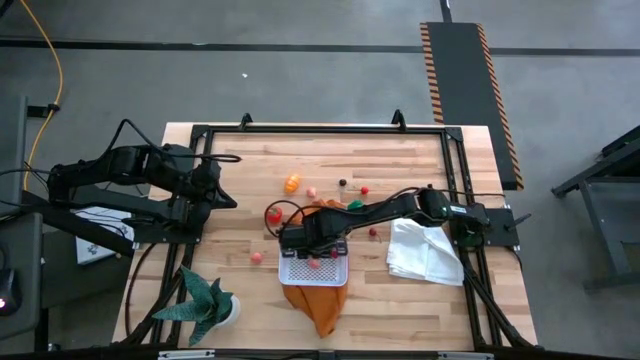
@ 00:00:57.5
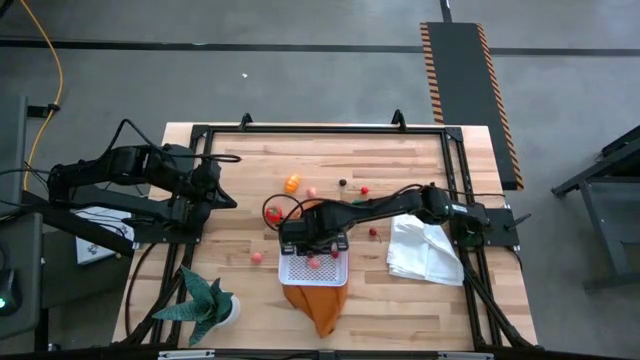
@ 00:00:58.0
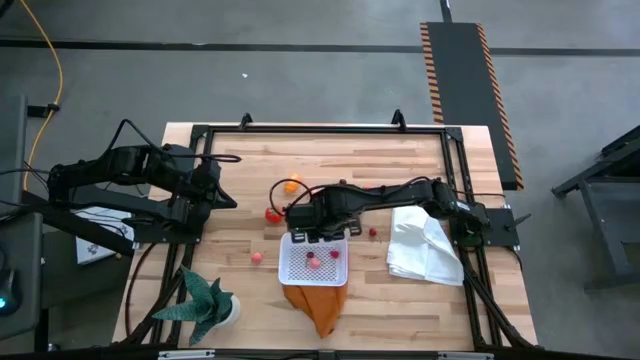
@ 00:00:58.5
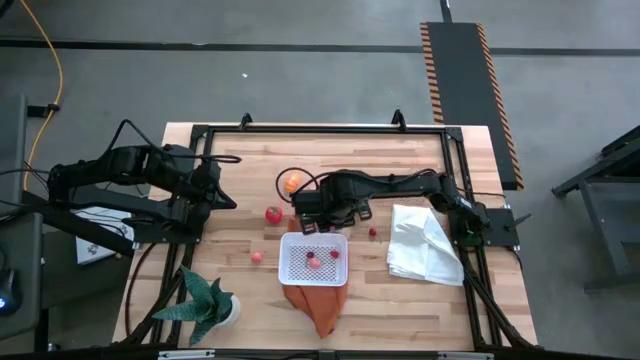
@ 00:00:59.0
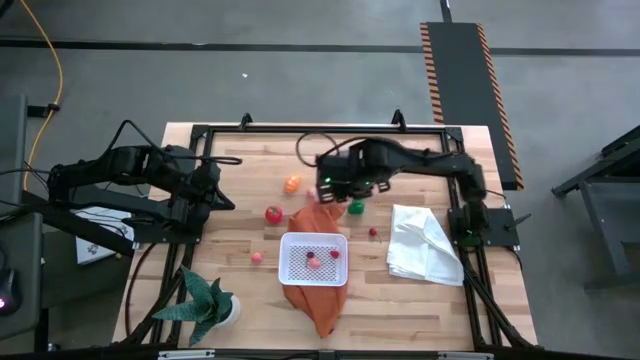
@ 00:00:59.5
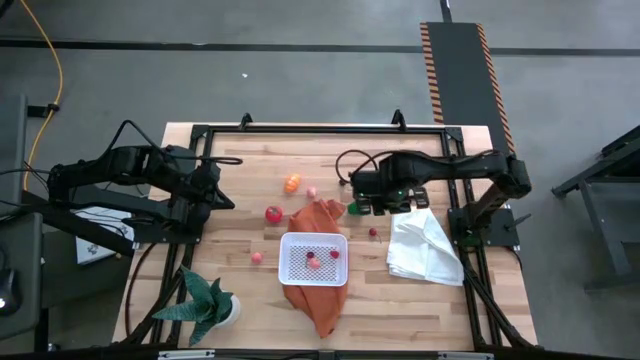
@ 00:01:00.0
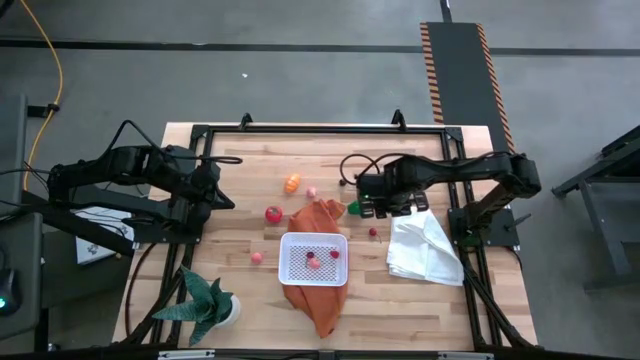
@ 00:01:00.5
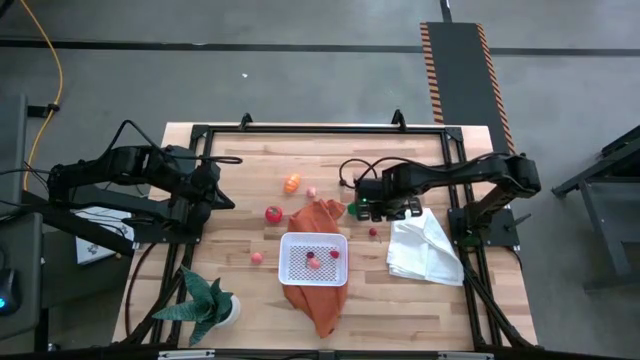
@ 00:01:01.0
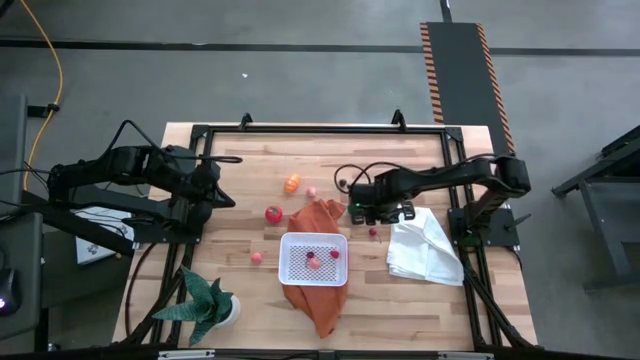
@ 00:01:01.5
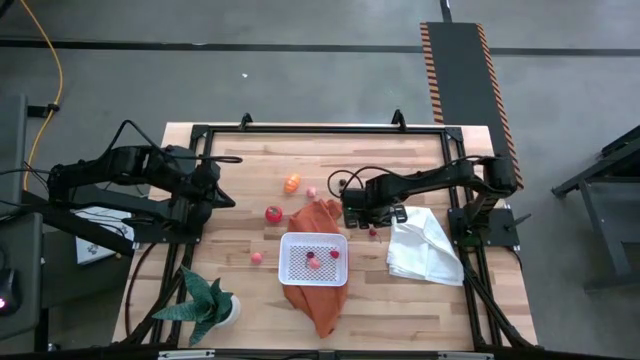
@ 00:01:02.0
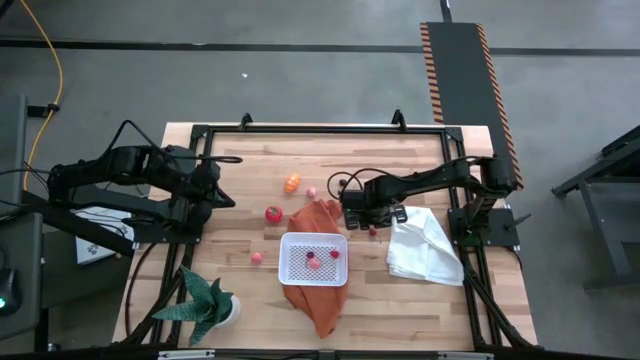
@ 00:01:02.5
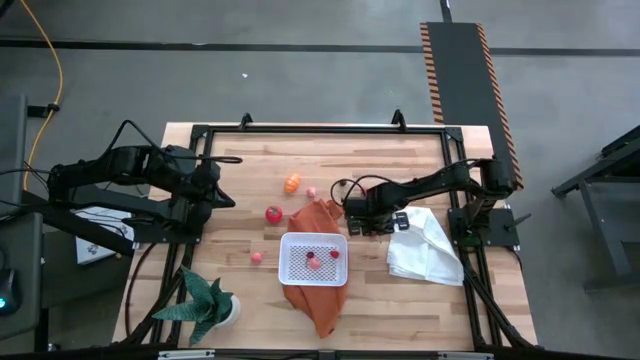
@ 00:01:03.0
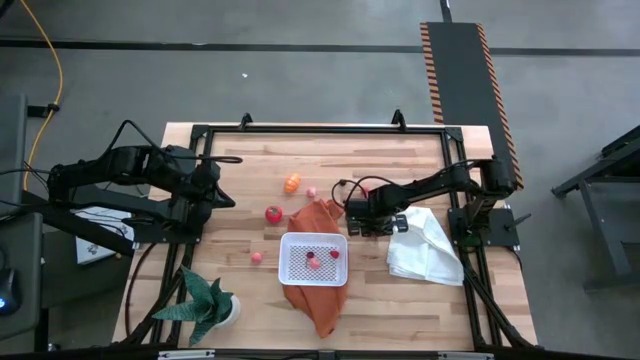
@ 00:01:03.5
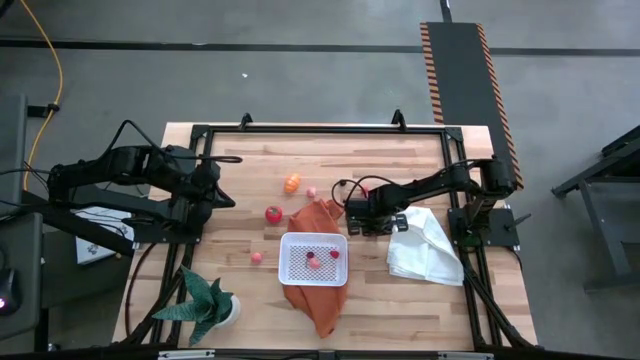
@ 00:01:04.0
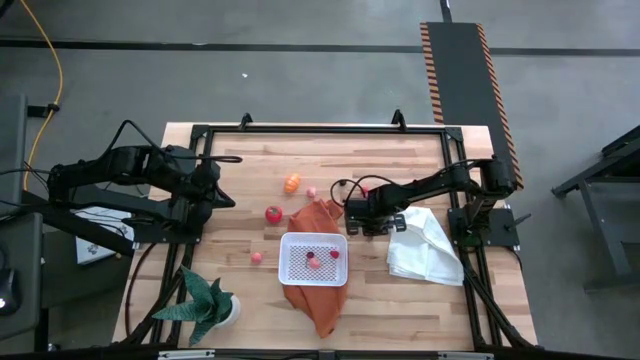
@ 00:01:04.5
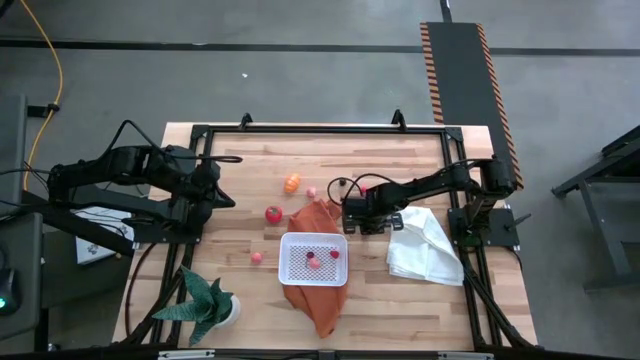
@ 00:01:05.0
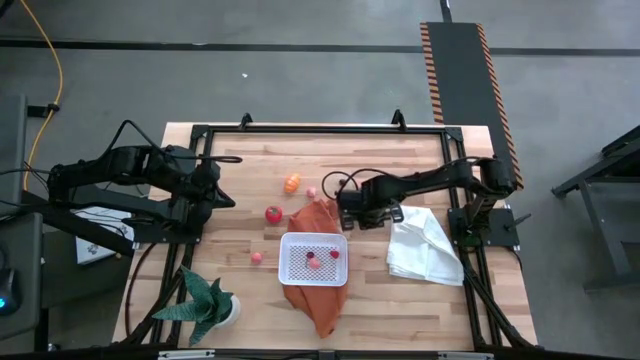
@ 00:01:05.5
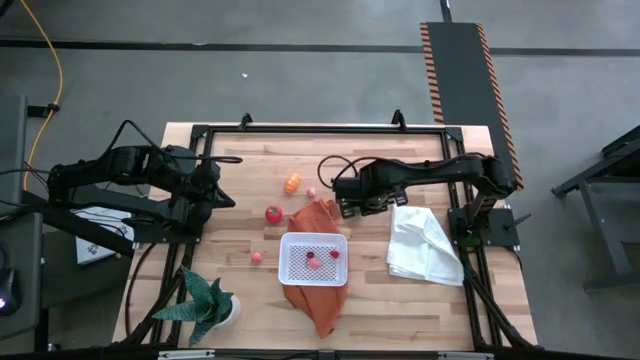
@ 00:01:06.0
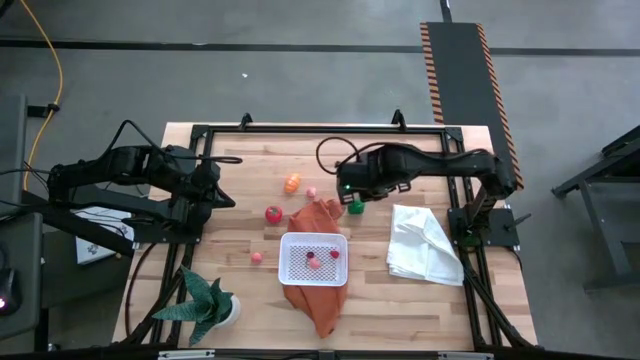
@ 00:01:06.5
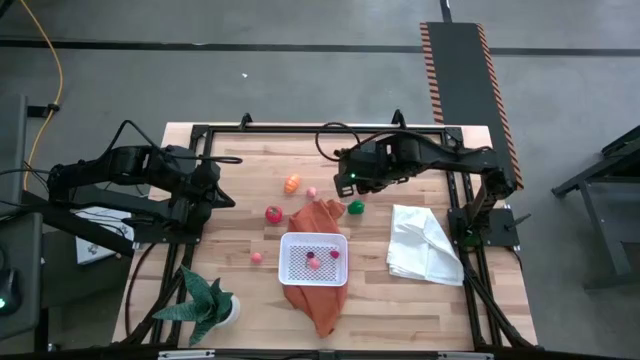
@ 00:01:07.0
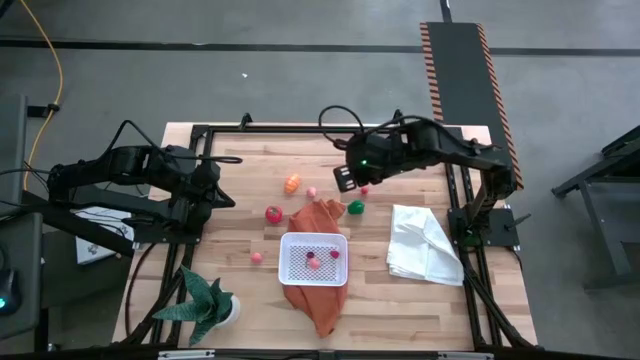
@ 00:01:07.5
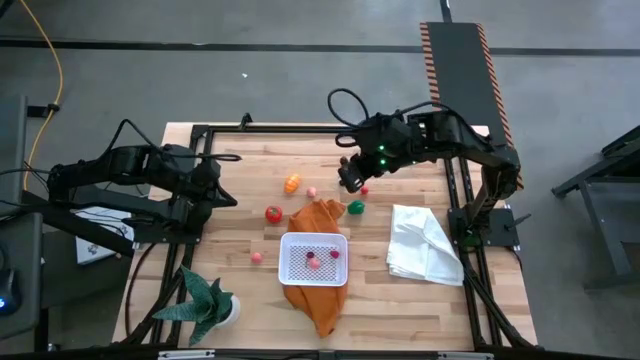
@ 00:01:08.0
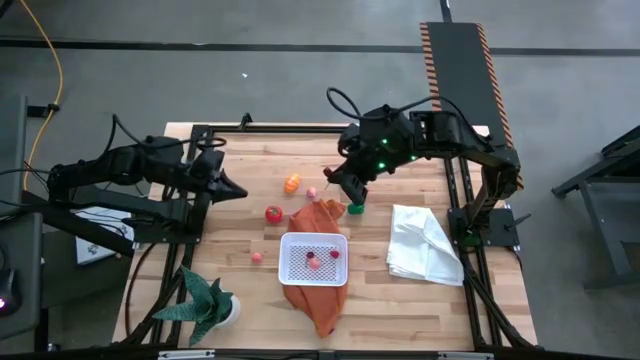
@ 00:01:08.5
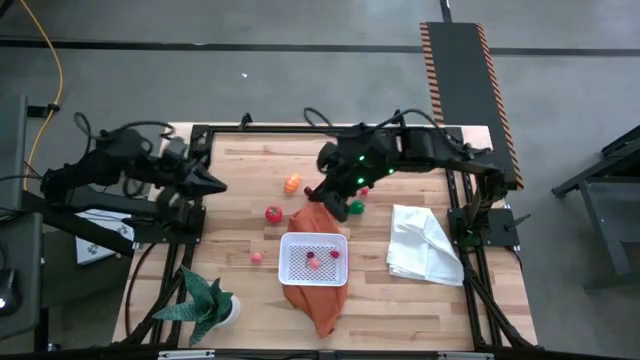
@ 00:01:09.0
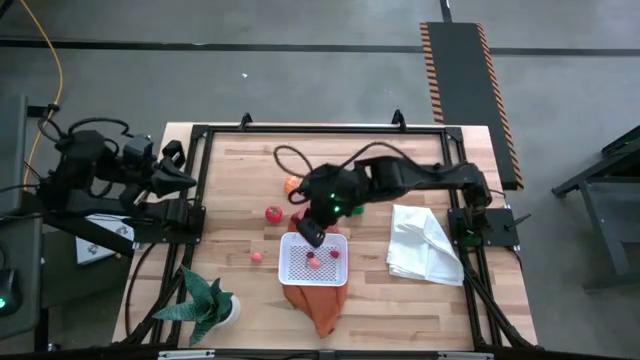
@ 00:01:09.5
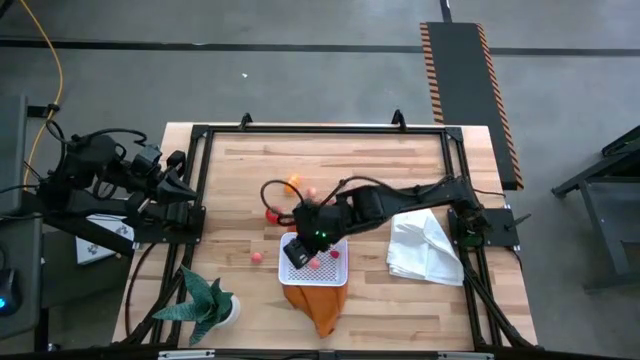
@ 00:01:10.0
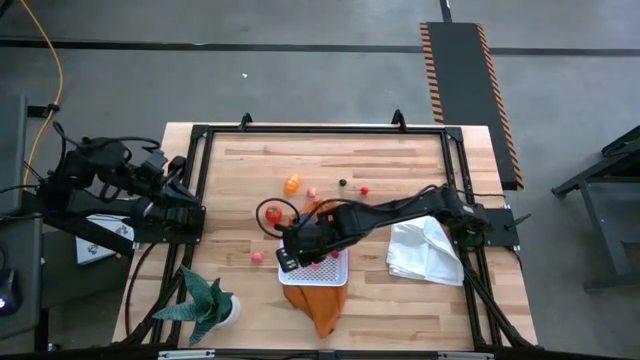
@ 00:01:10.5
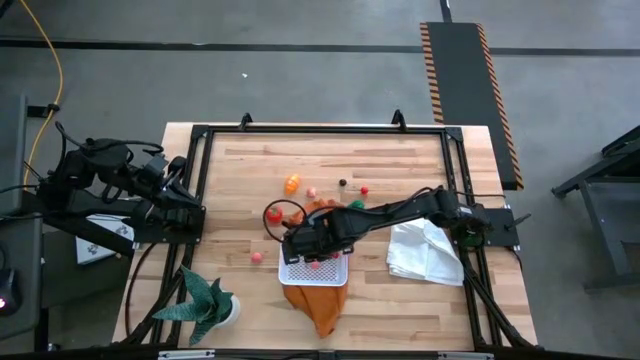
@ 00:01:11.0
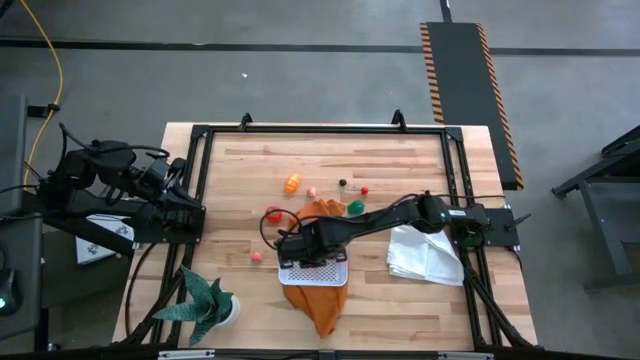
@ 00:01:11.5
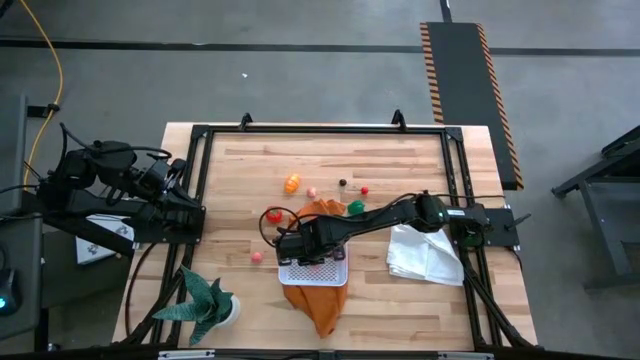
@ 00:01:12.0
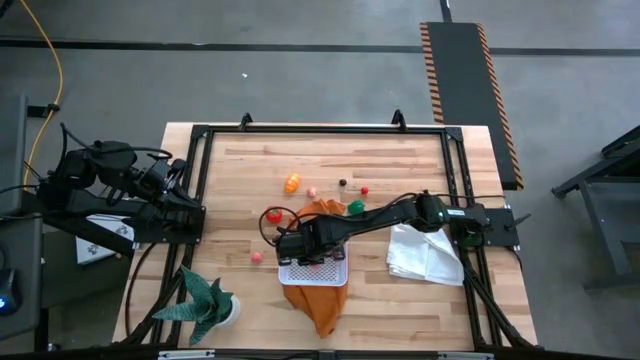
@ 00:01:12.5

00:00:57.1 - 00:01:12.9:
Task: Pick and placing Produce into tupperware
Put the bottom red cherry into the white basket
